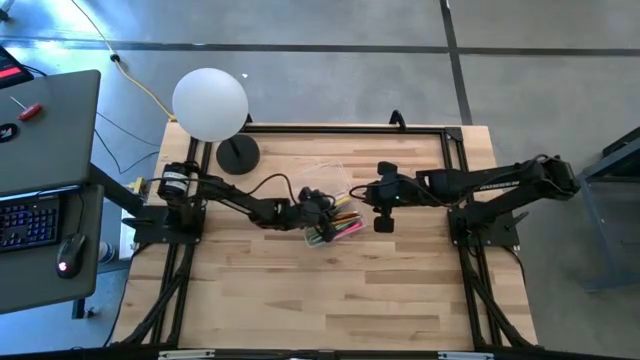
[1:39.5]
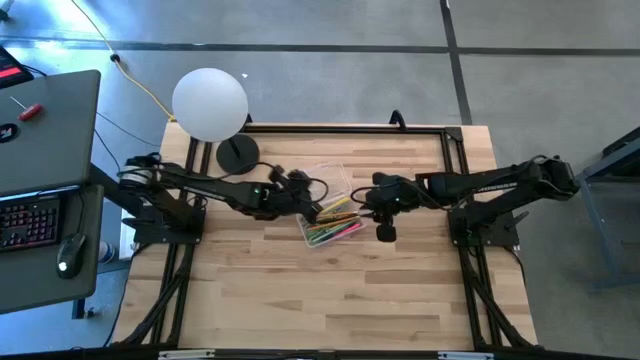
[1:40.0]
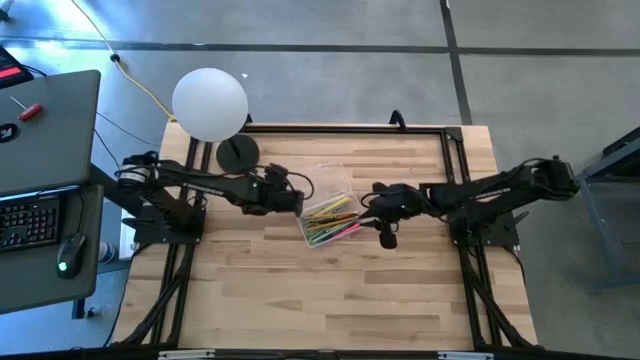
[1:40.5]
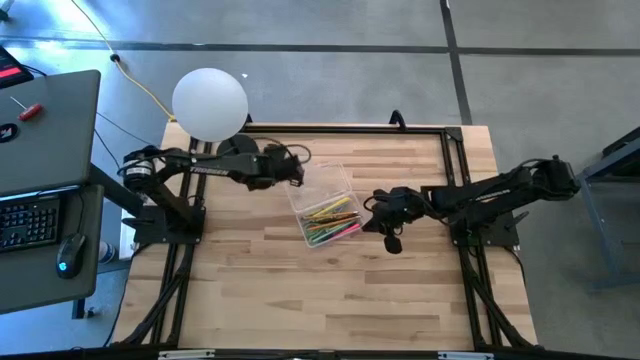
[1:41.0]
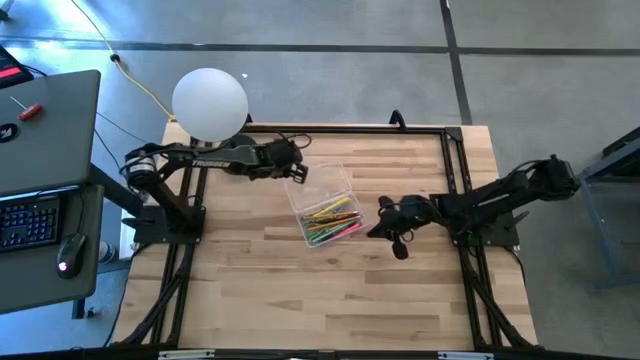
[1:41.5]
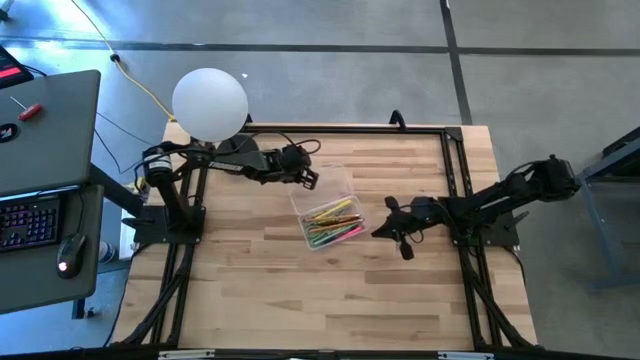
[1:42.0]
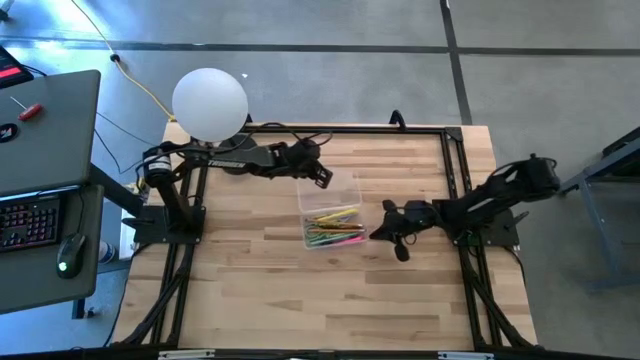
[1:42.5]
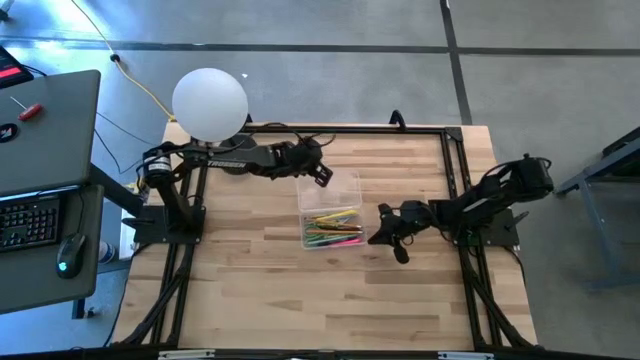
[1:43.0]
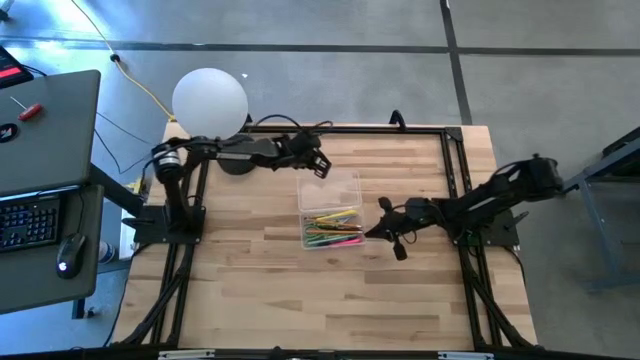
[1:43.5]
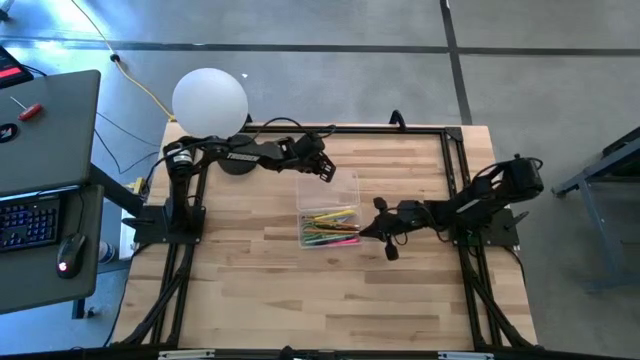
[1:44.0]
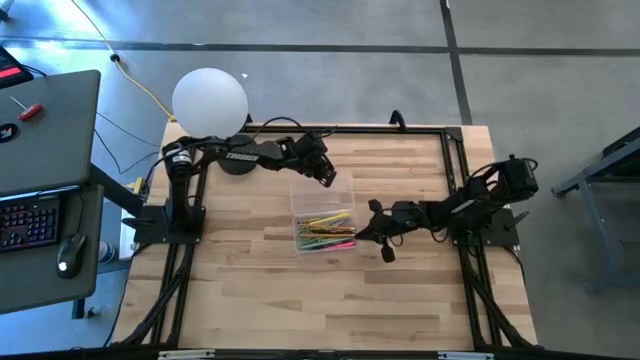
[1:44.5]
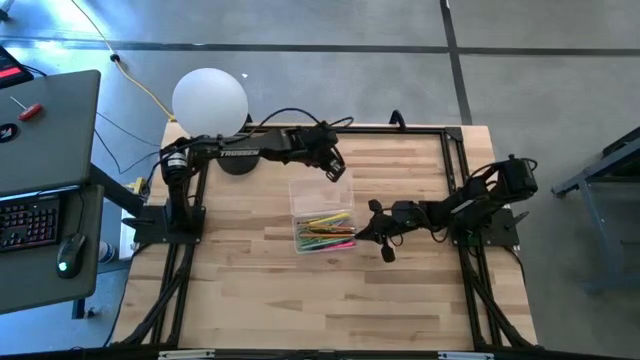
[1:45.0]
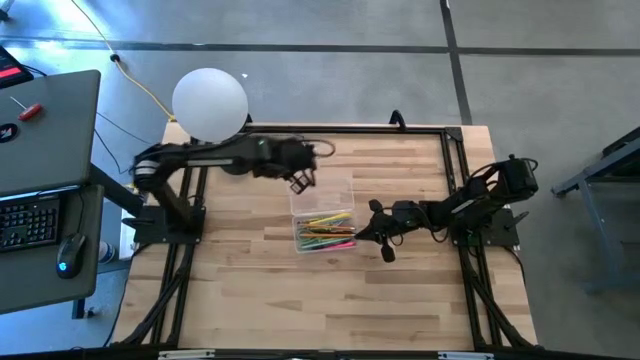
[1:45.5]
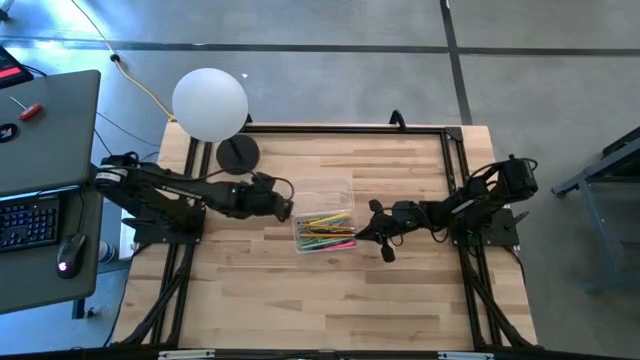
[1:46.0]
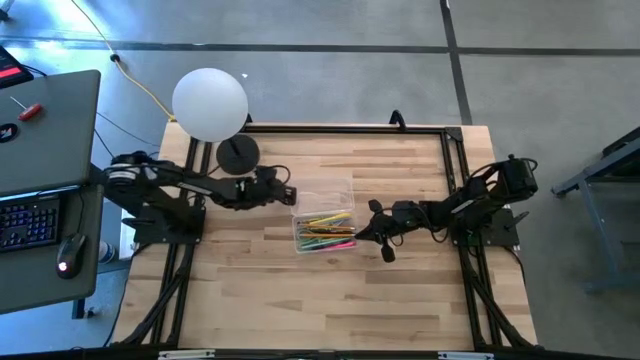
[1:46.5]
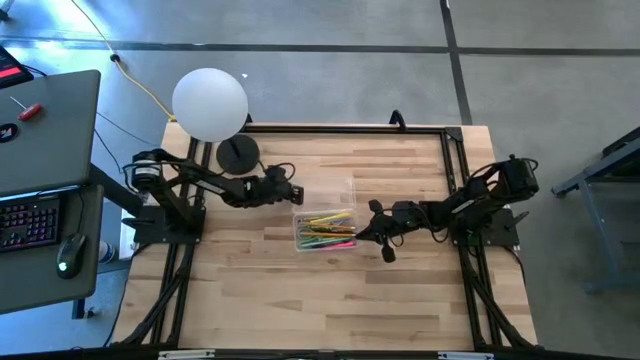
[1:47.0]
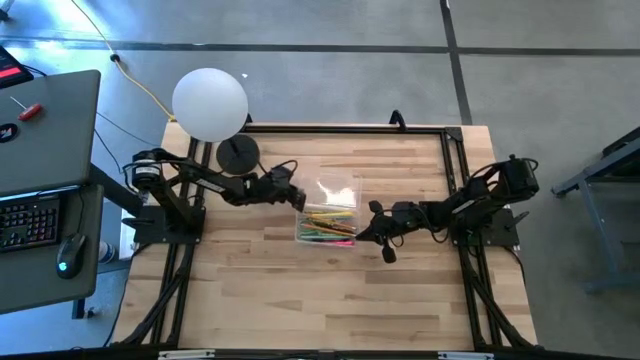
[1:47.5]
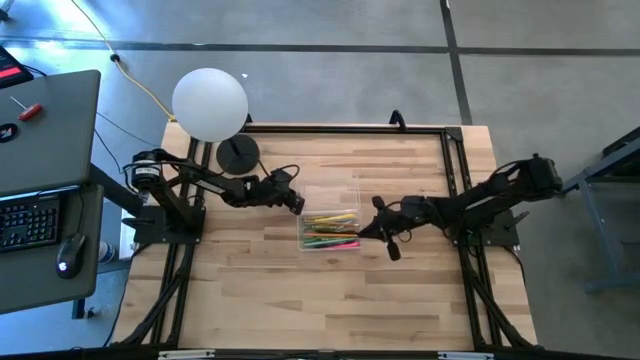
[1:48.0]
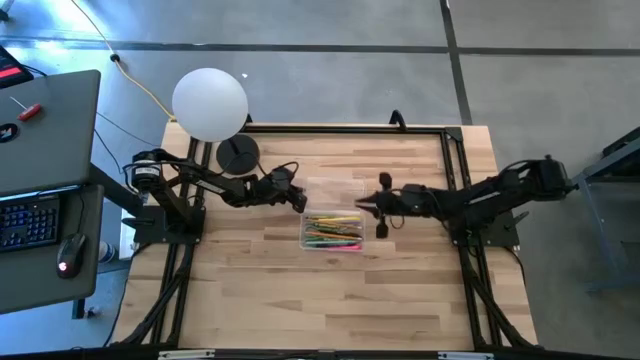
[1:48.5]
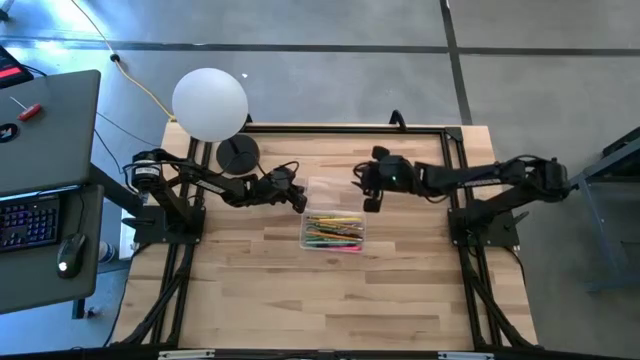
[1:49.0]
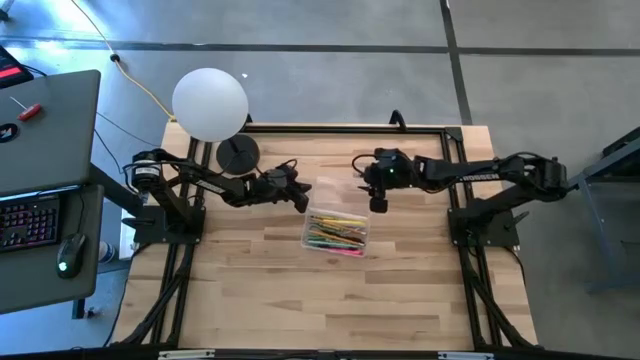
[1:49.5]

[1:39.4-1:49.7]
Task: Pick & place school supplies into a supply box
Close the transparent supply box

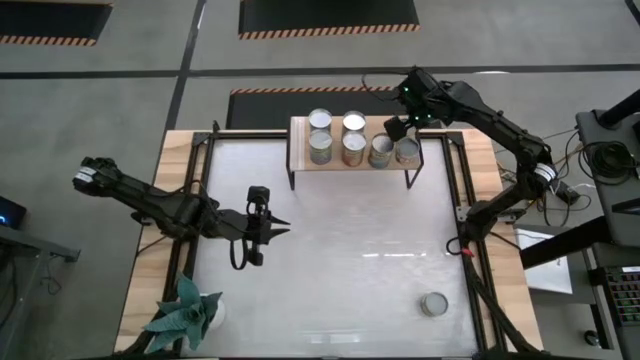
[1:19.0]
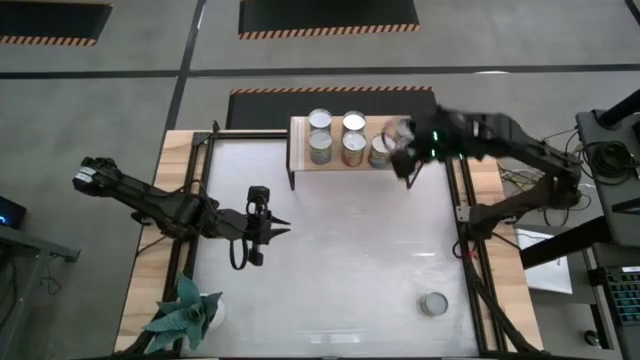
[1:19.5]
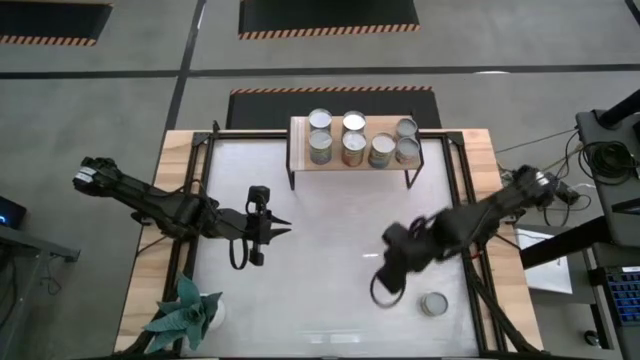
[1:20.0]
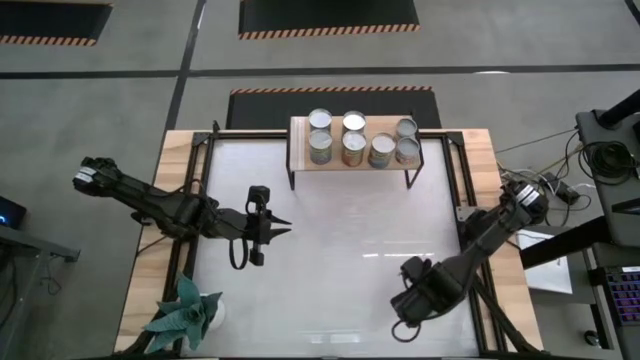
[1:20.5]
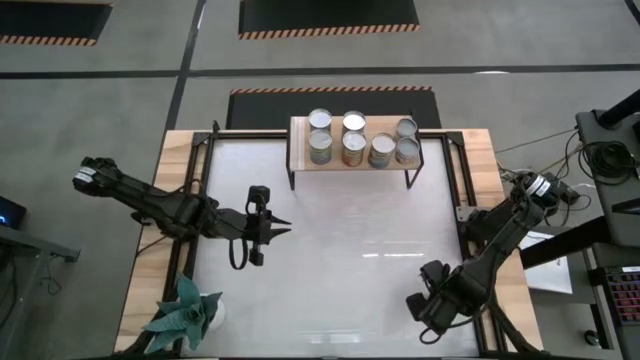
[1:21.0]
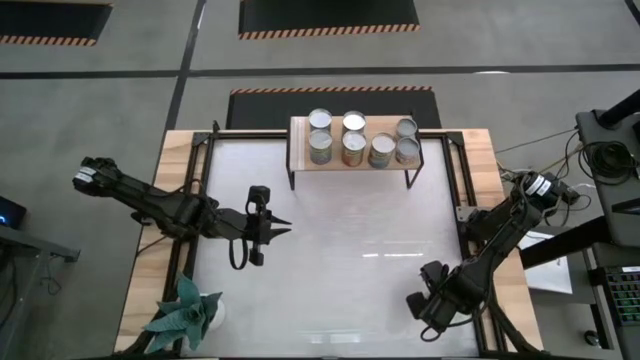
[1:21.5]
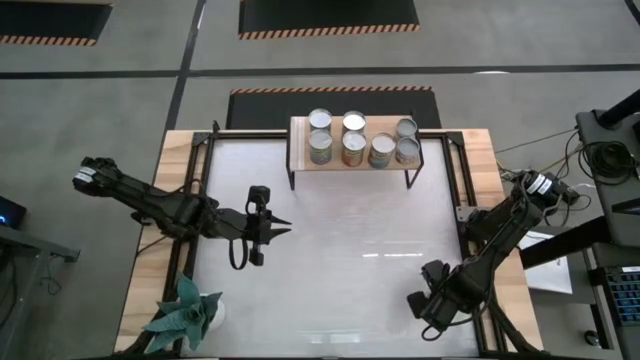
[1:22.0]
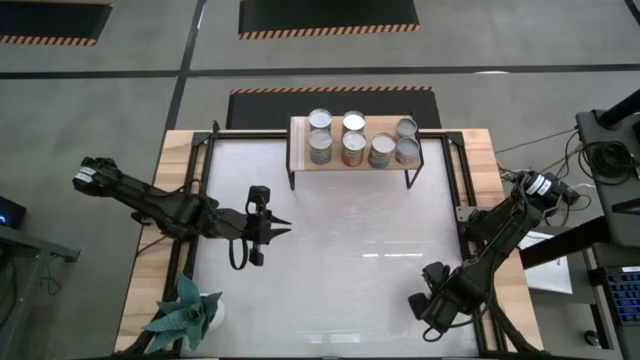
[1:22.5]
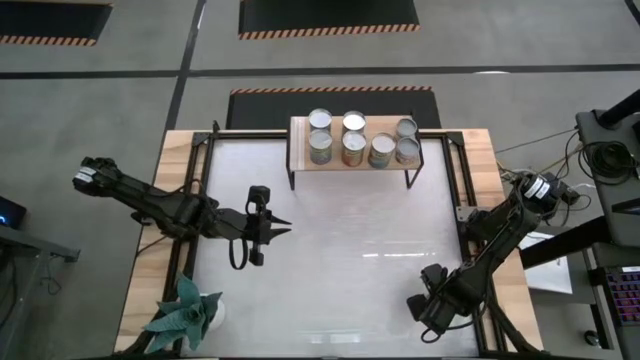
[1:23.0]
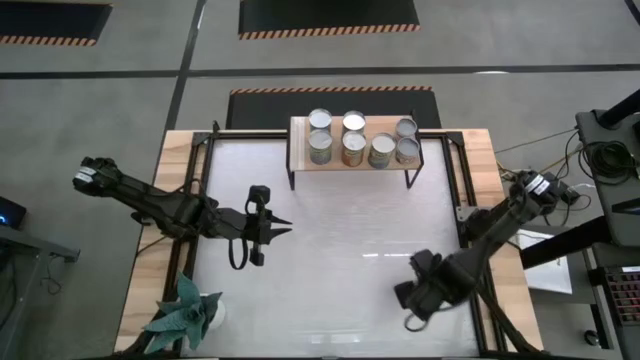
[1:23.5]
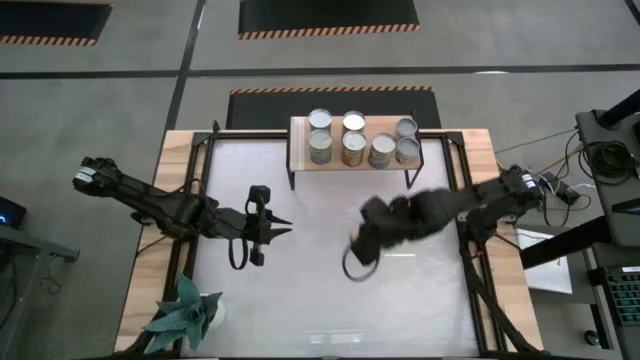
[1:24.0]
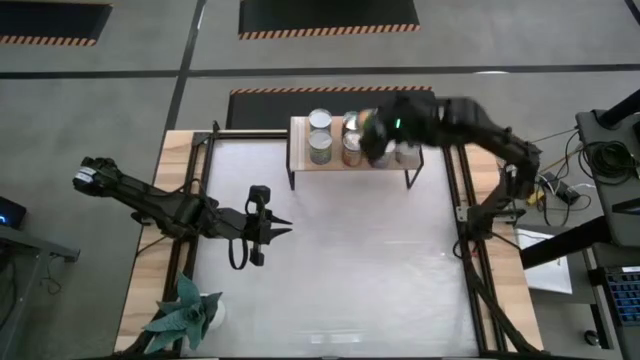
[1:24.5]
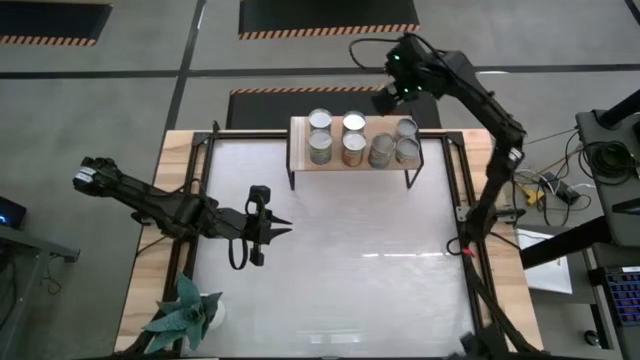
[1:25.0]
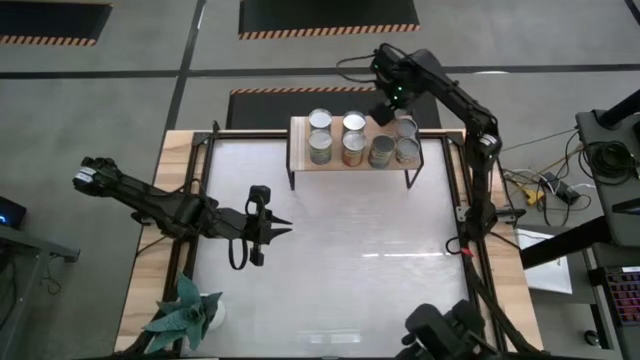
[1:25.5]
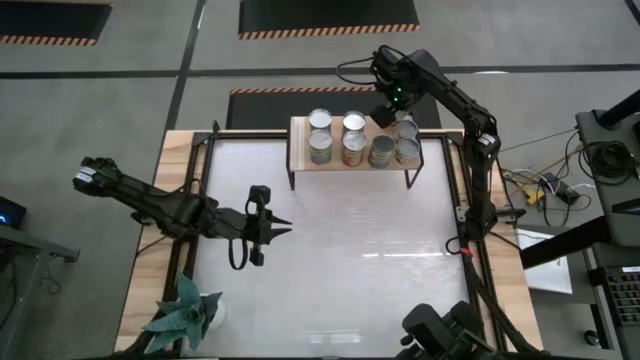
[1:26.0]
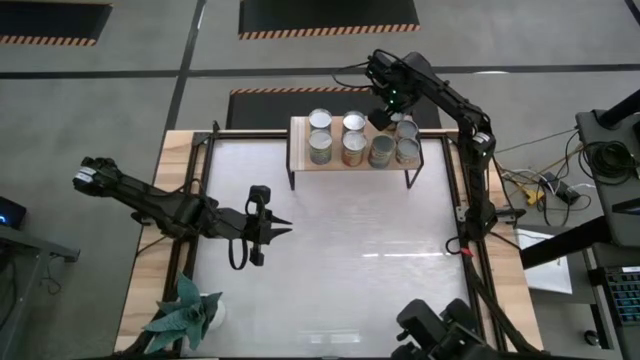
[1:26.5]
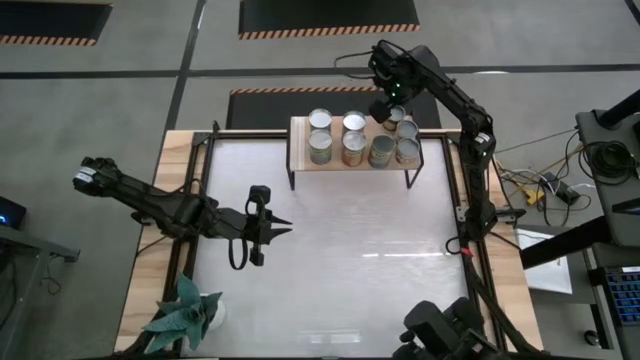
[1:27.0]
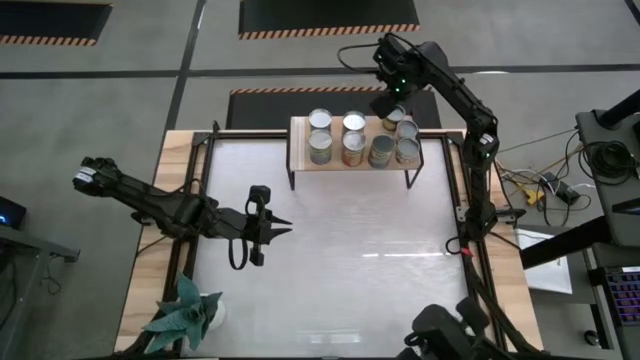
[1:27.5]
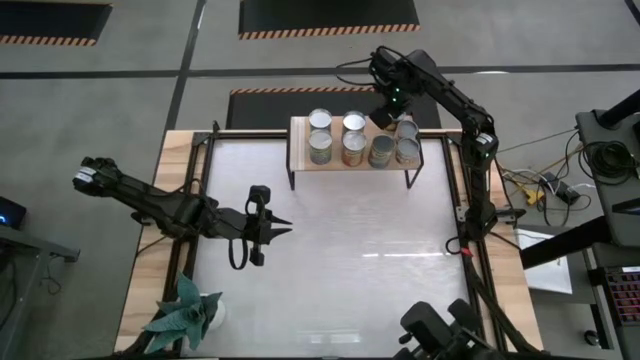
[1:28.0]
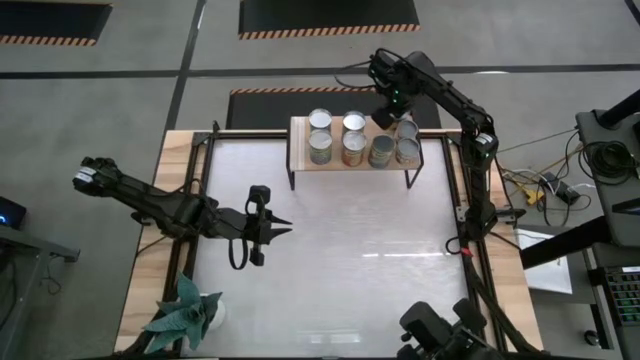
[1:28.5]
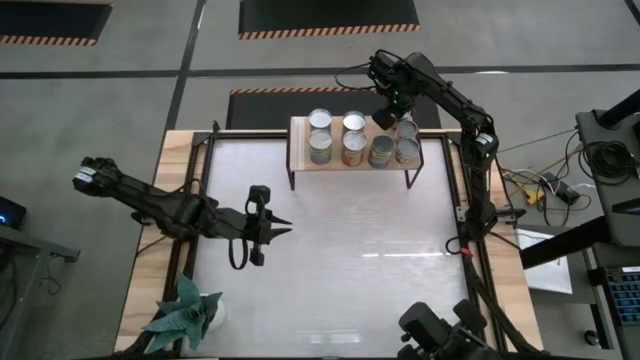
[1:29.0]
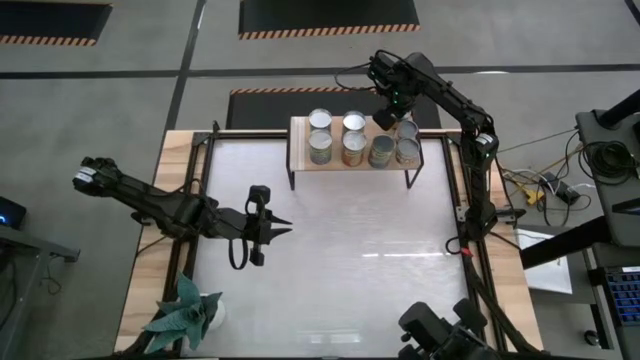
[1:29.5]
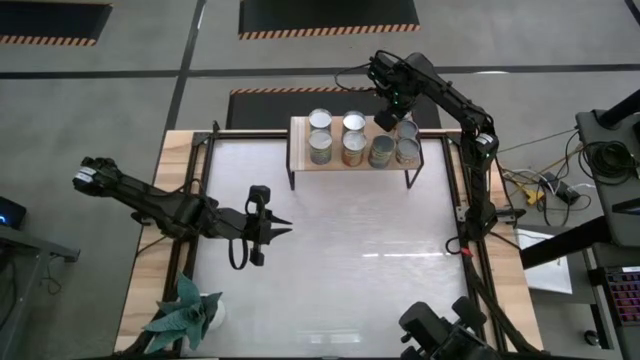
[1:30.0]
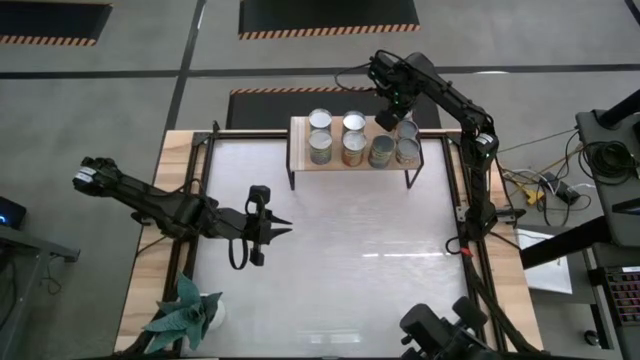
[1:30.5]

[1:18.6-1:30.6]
Task: Pick and place cans onto a shelf
Put the canned peaches on the shelf
